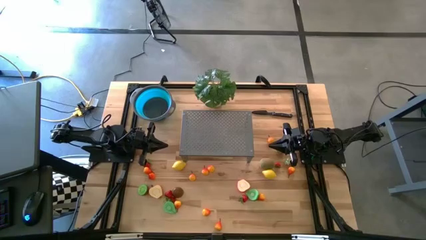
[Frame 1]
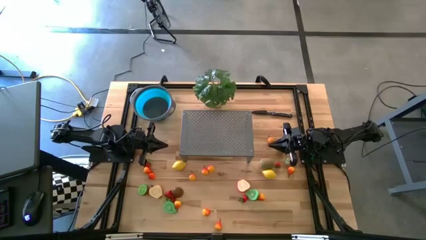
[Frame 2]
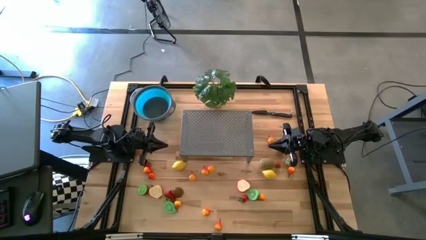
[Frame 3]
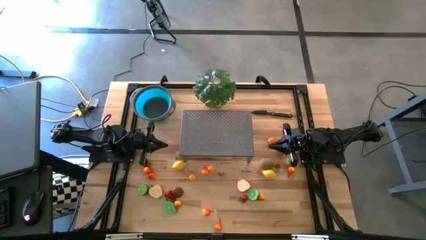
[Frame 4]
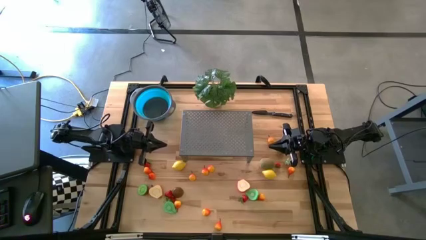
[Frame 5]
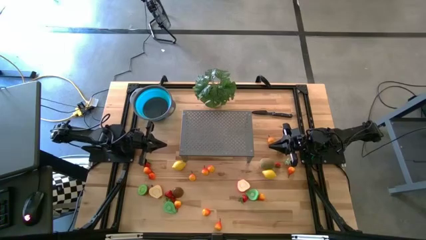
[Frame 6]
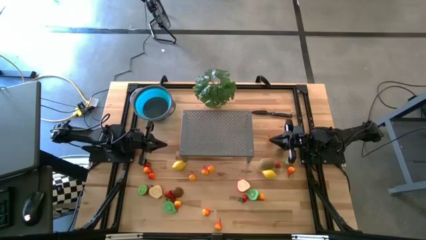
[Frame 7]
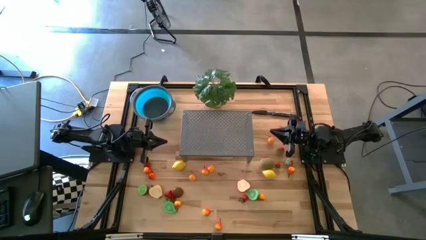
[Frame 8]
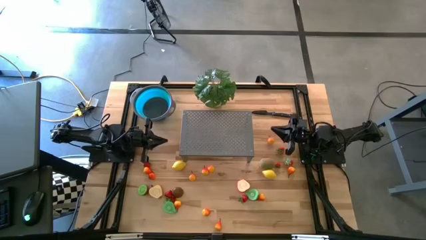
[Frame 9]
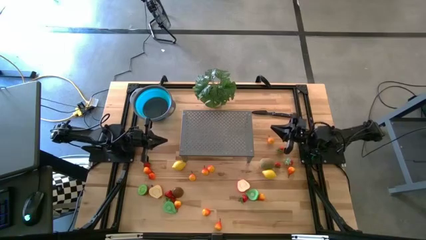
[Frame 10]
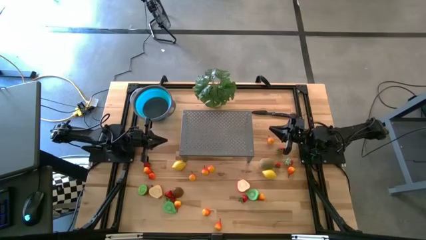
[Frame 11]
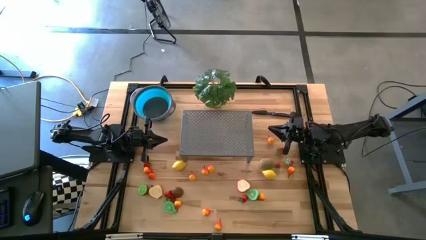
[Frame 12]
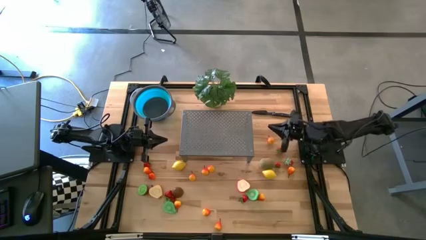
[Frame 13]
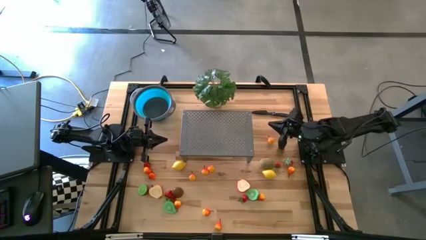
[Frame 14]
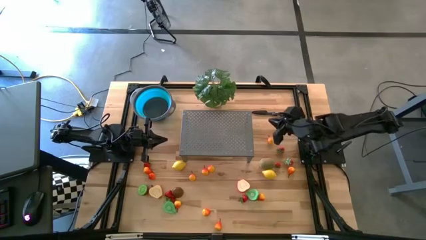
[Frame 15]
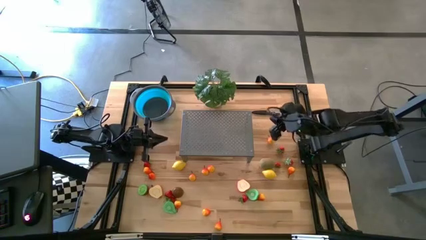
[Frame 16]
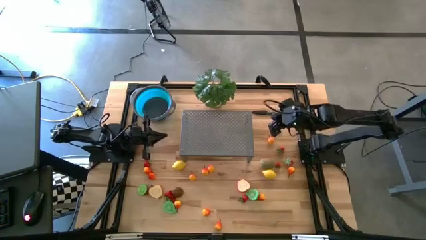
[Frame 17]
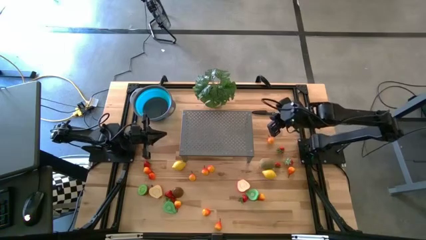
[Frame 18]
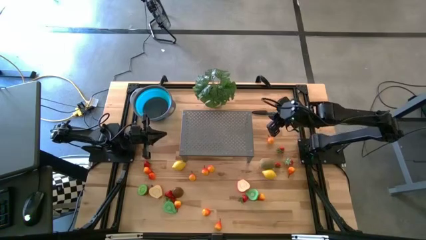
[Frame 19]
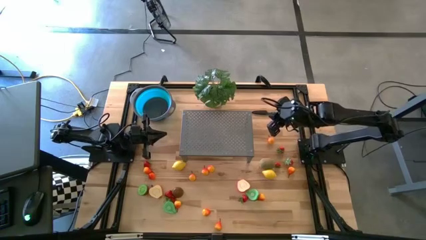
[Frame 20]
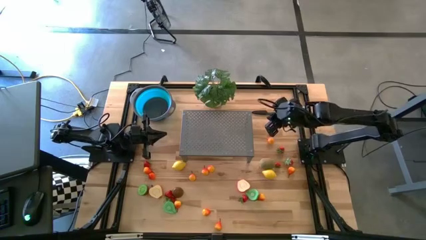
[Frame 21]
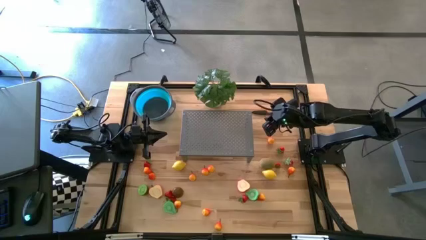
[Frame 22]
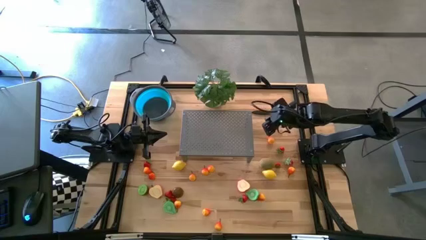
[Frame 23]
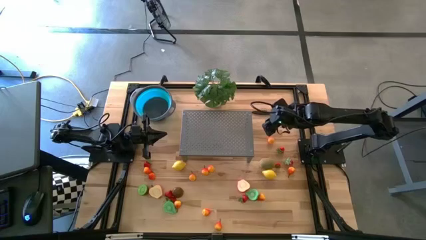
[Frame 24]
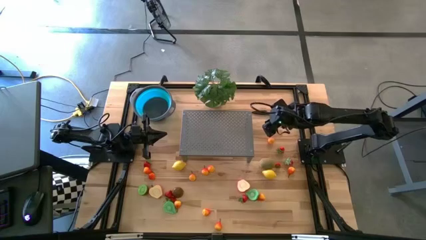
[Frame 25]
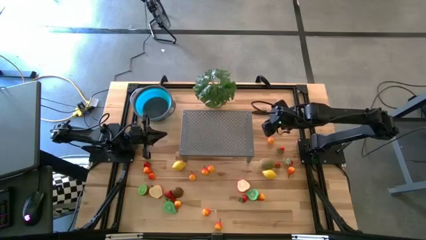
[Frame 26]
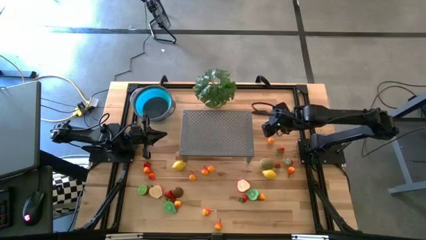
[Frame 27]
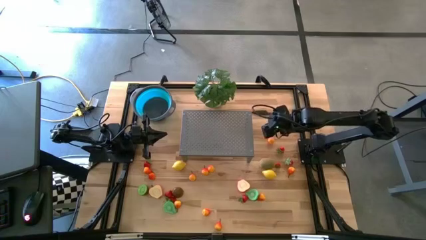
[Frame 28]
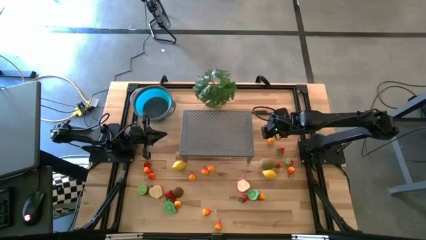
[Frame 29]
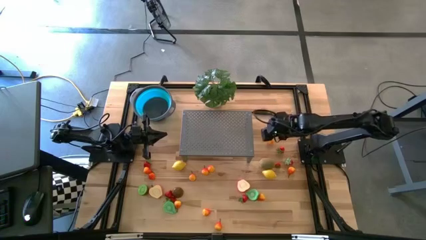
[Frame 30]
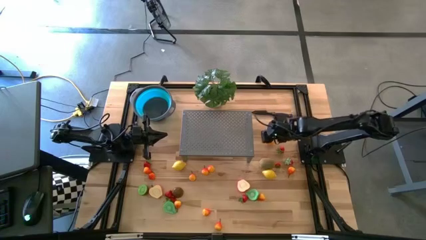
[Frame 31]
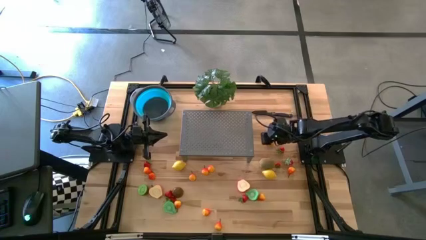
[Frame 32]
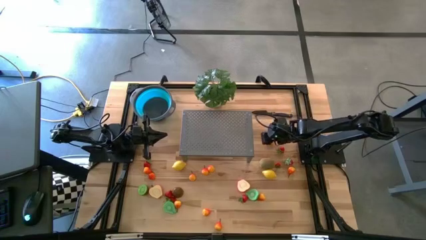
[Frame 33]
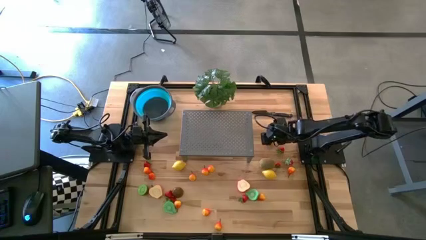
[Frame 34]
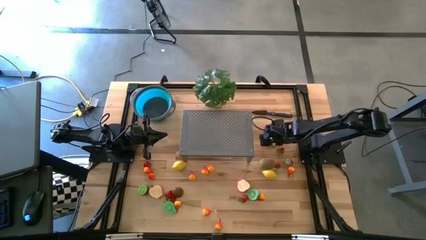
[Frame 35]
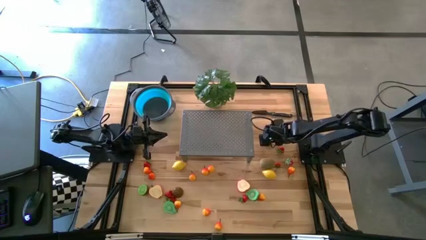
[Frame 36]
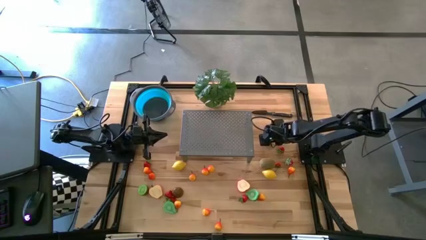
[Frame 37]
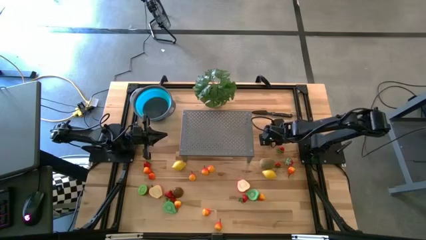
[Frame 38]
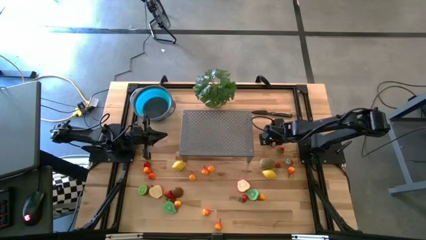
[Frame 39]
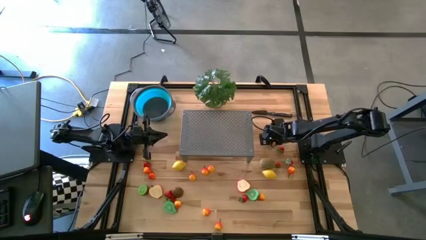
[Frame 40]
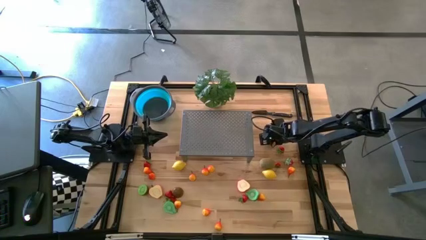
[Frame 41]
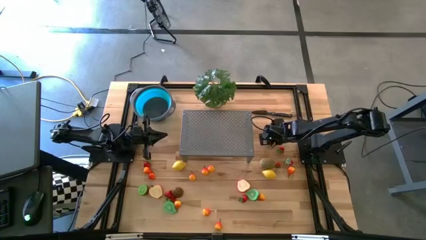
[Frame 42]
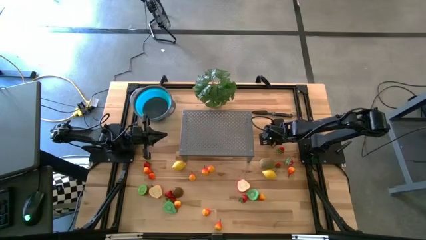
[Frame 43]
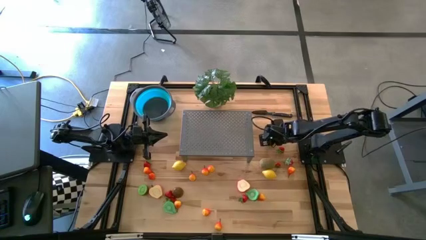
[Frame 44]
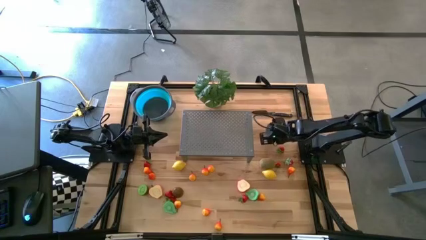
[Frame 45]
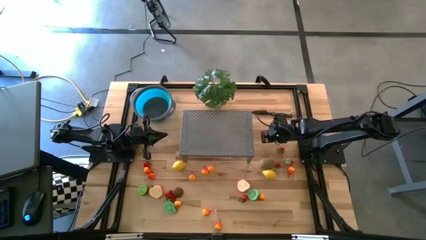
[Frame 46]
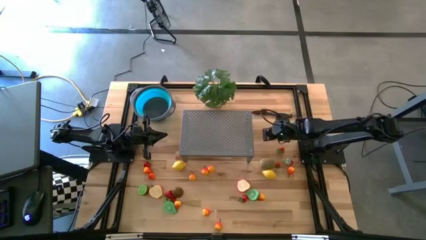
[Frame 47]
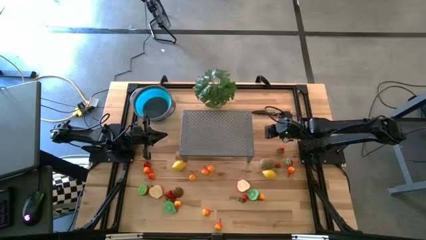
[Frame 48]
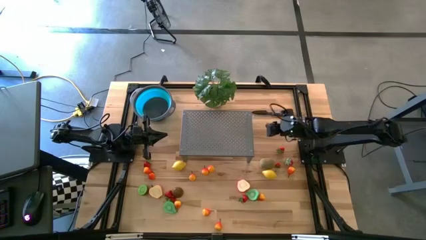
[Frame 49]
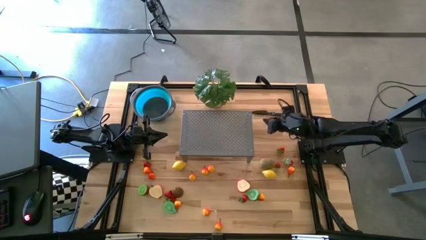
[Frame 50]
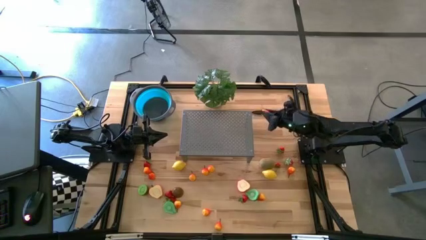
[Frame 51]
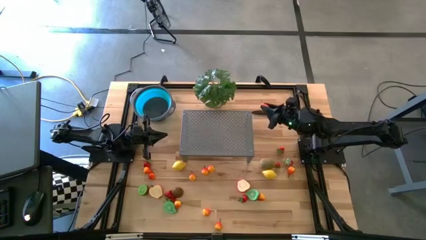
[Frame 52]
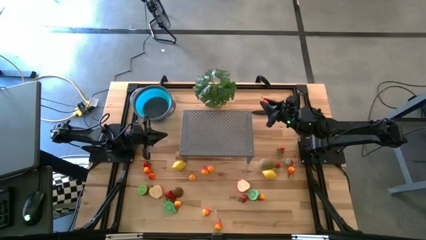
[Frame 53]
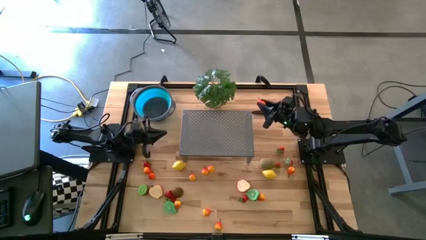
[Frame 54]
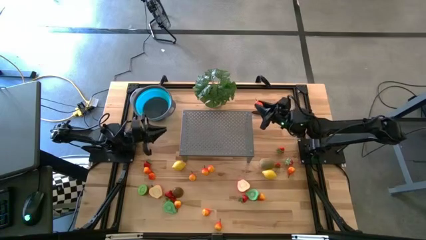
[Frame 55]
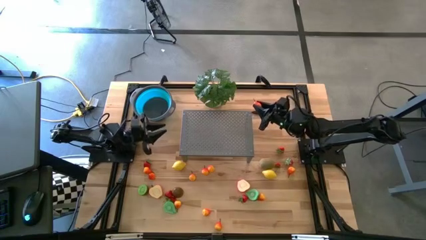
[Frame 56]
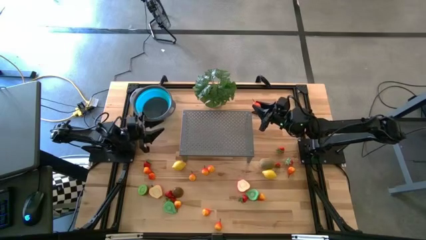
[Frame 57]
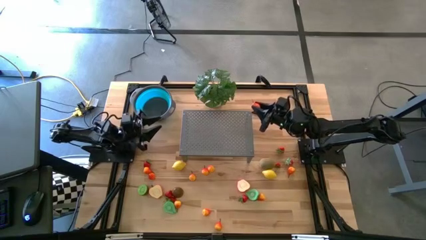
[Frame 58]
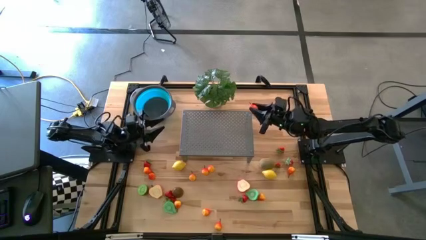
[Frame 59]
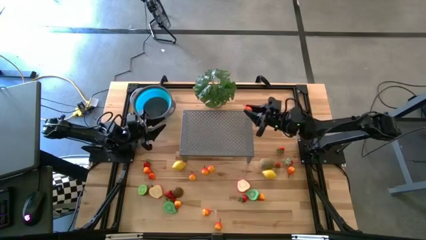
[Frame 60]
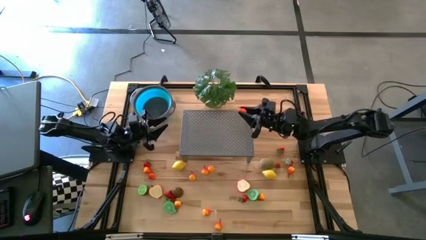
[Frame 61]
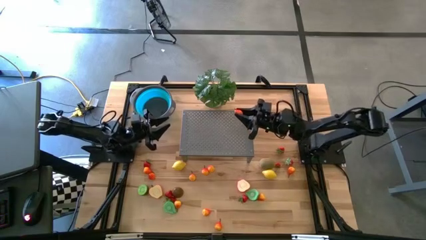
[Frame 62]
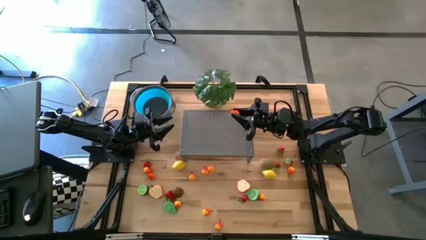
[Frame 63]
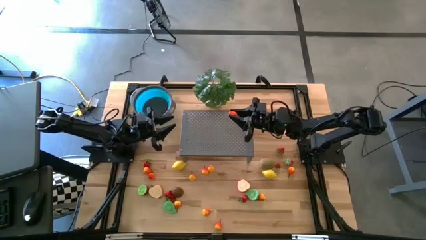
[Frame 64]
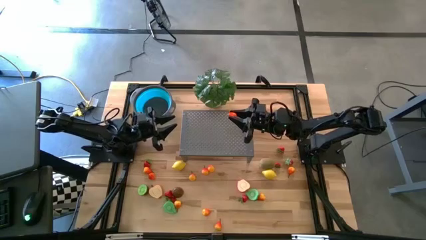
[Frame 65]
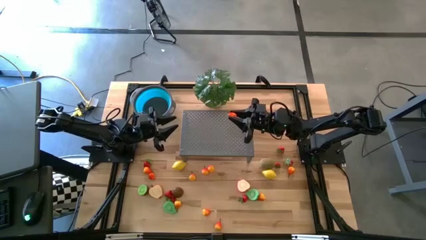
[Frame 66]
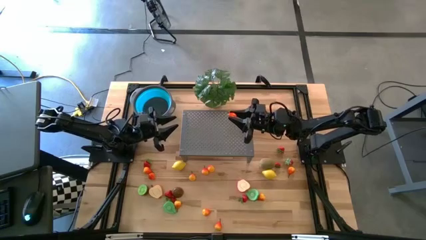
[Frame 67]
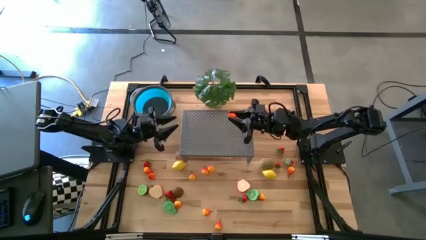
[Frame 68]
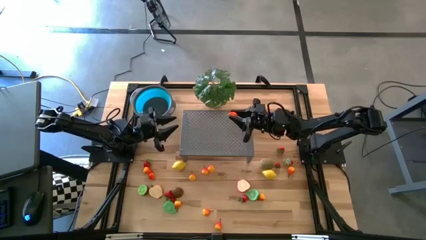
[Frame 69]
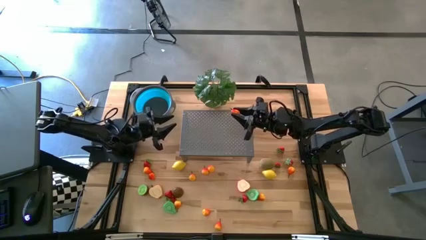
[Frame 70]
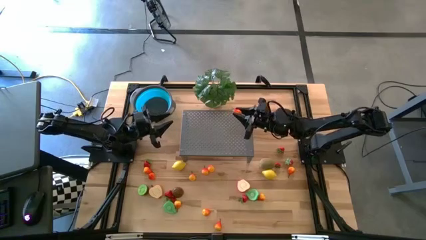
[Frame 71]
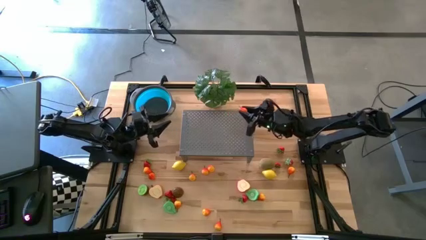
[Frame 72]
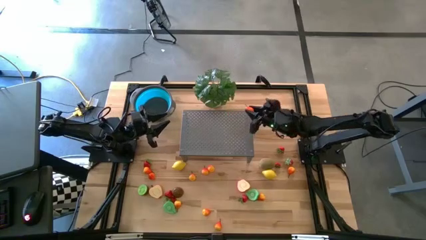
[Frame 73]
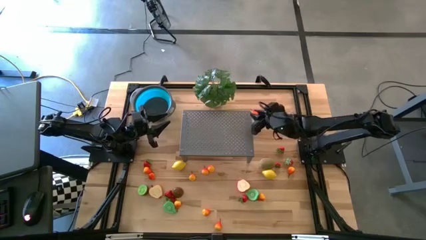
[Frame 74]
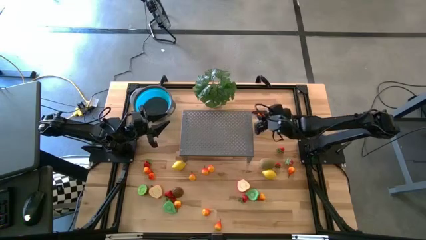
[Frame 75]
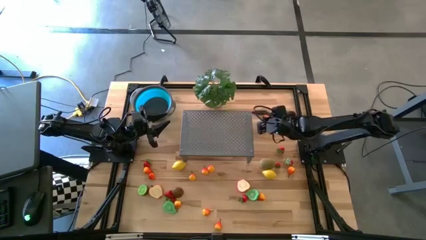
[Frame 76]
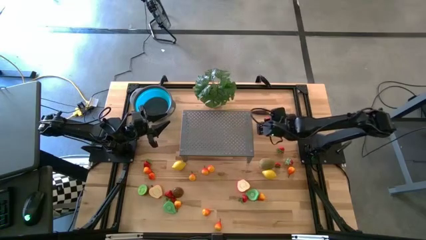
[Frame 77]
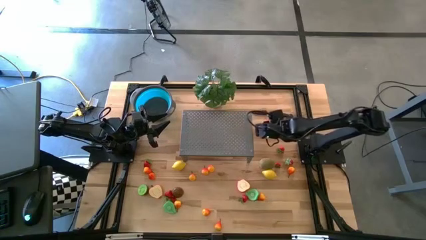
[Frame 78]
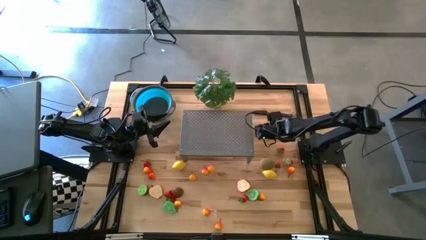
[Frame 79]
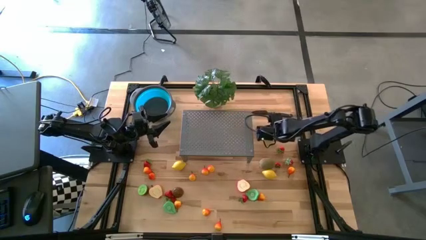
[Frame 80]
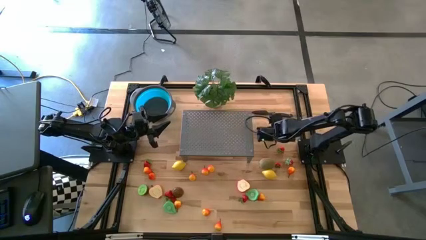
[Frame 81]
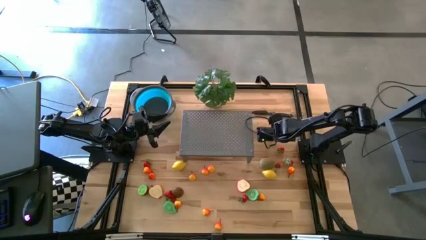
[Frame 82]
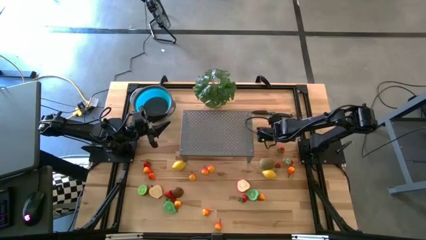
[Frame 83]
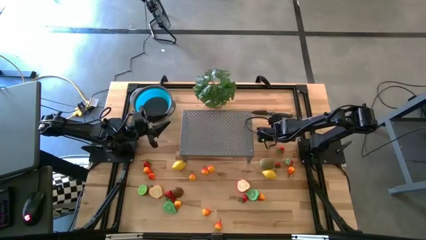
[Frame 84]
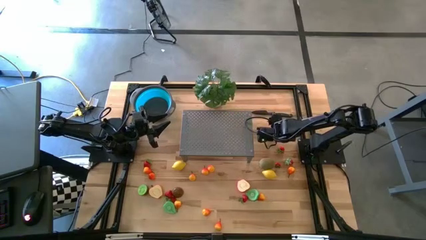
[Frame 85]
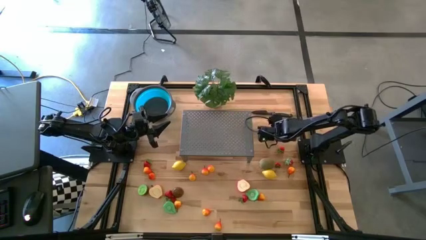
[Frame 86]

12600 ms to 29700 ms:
Task: Pick & Place Fruit
Put the pear into the blue strainer bowl on the shelf
